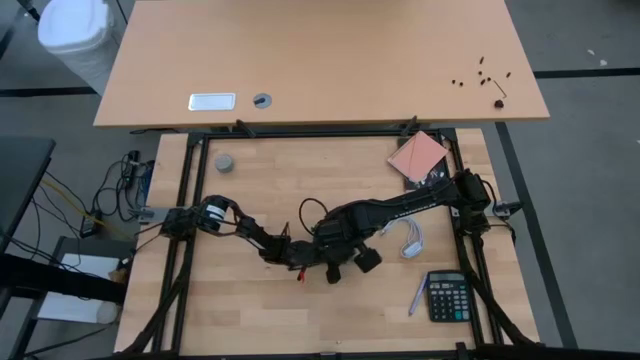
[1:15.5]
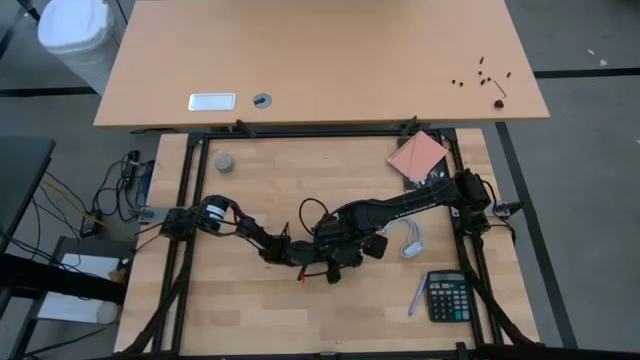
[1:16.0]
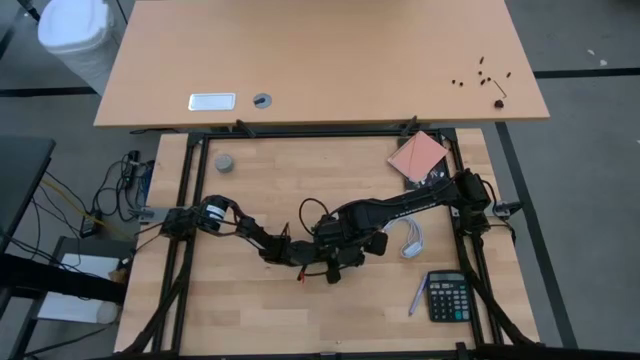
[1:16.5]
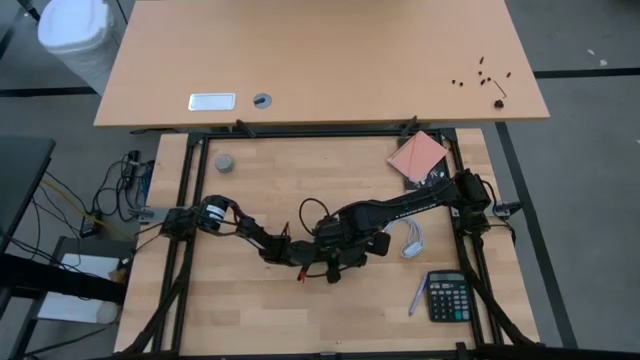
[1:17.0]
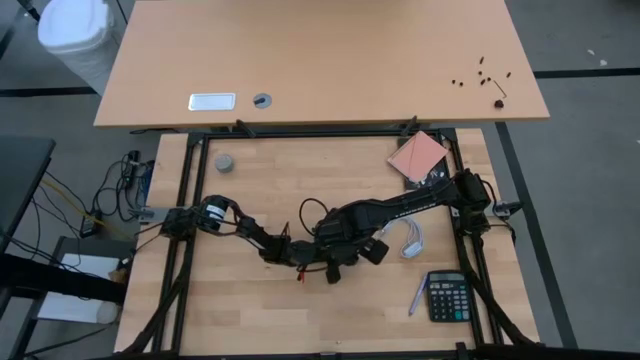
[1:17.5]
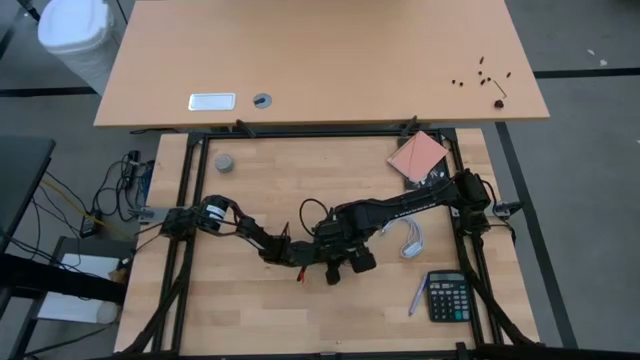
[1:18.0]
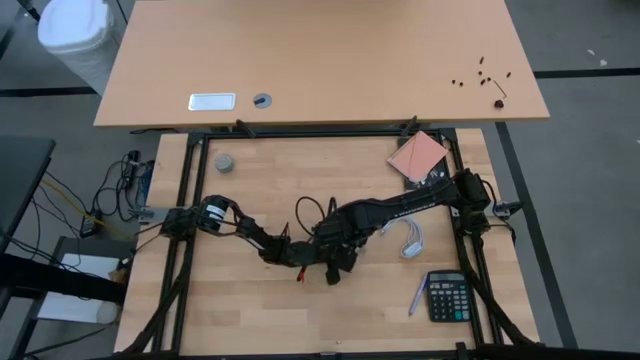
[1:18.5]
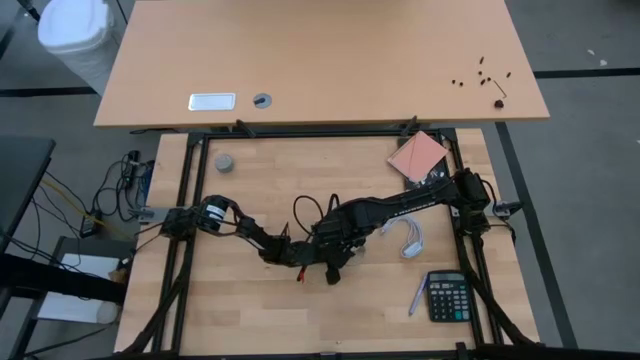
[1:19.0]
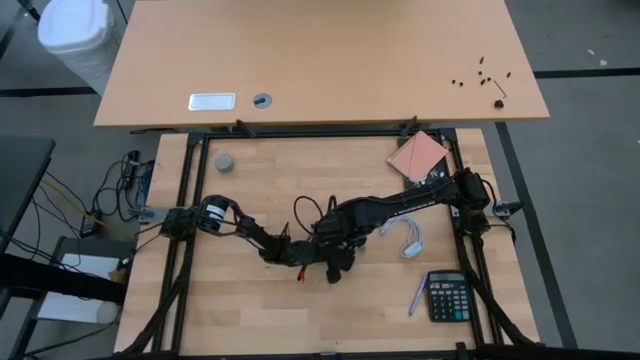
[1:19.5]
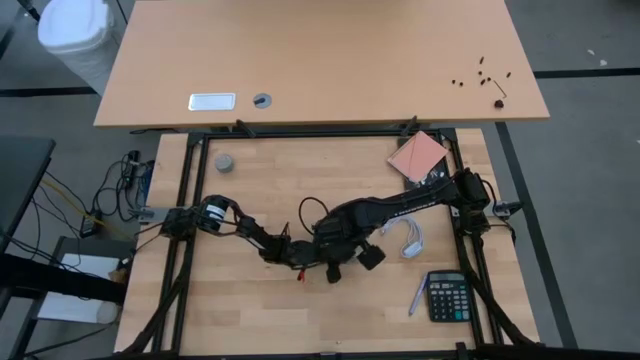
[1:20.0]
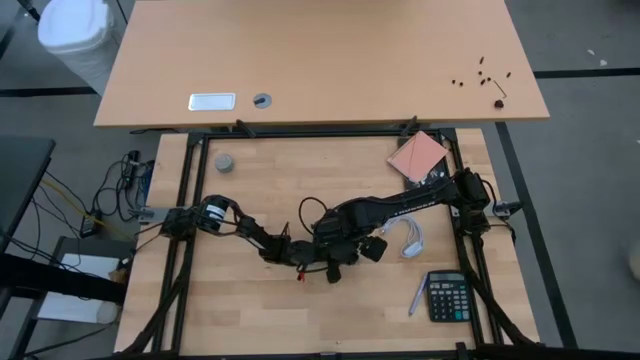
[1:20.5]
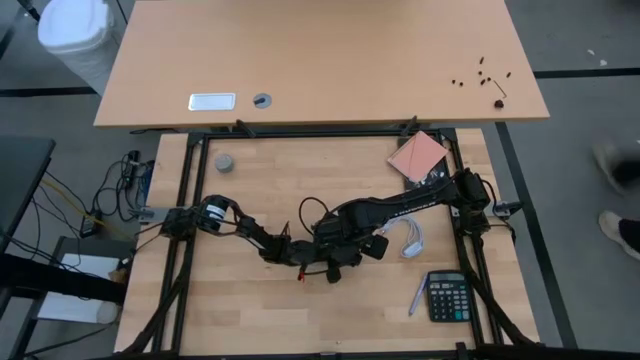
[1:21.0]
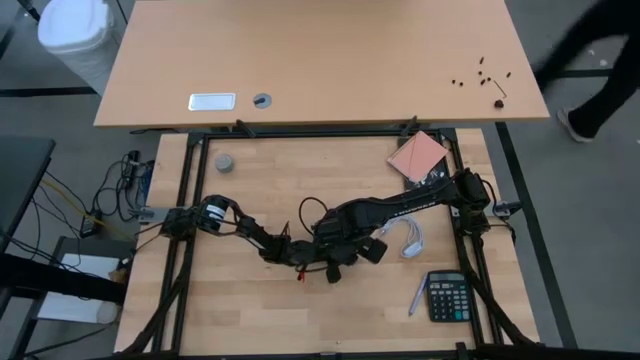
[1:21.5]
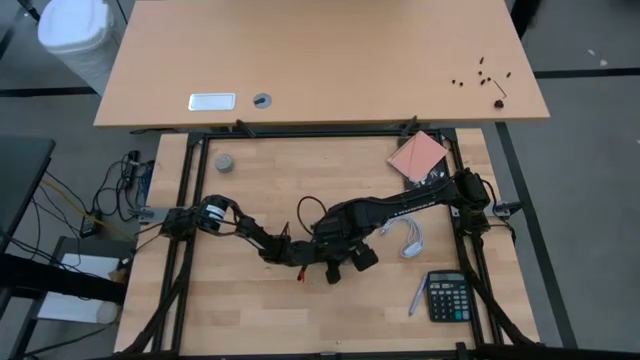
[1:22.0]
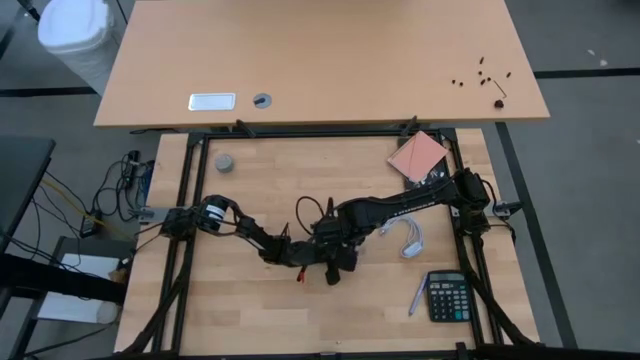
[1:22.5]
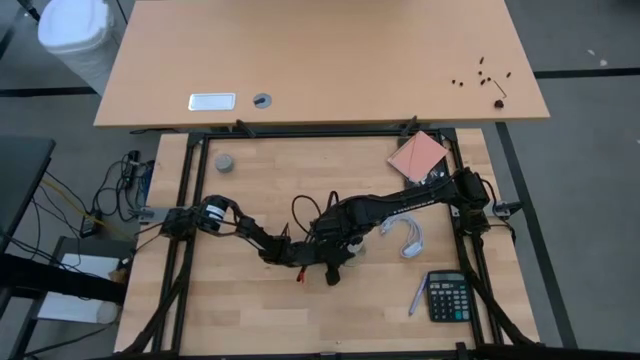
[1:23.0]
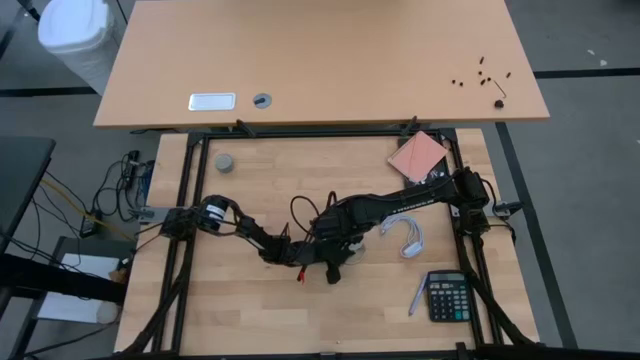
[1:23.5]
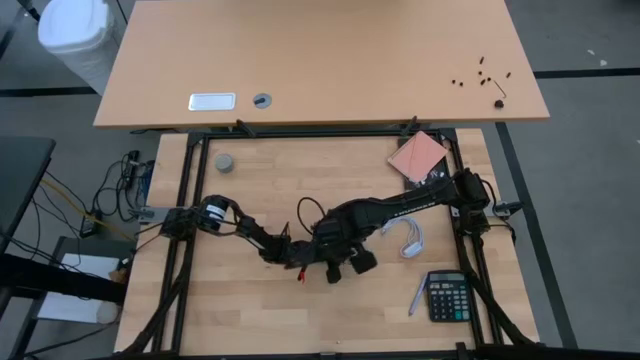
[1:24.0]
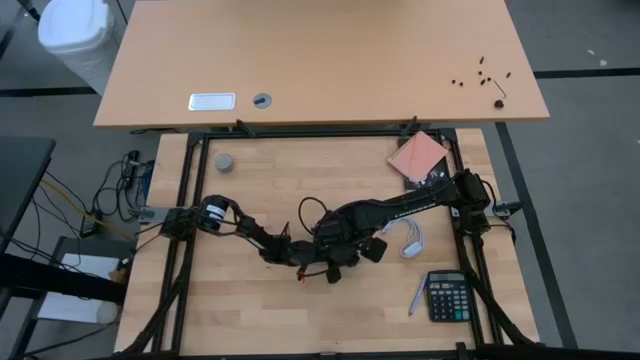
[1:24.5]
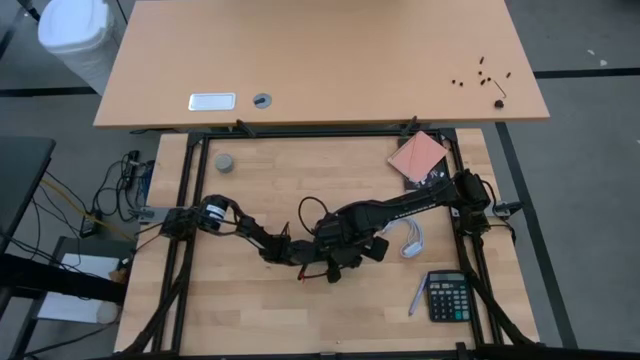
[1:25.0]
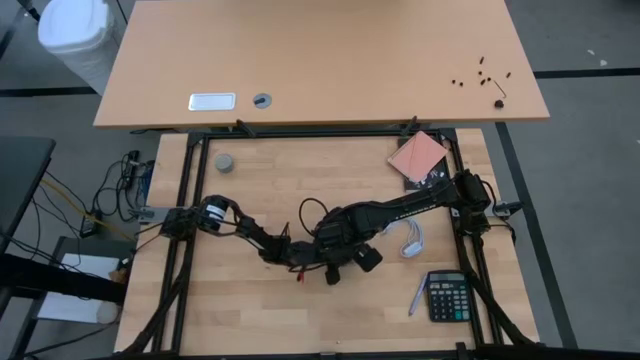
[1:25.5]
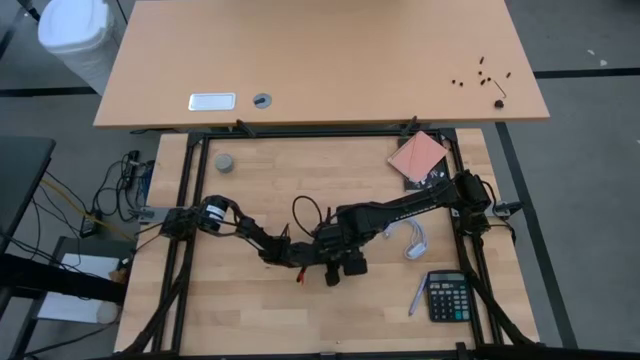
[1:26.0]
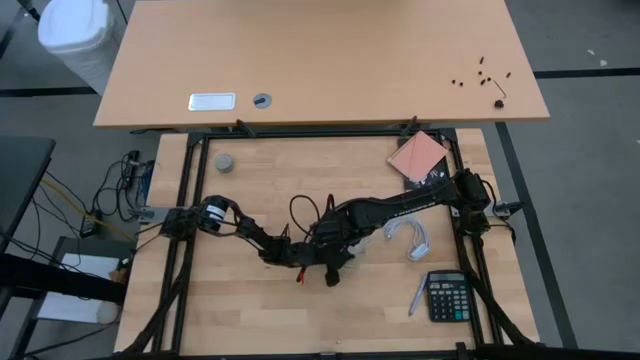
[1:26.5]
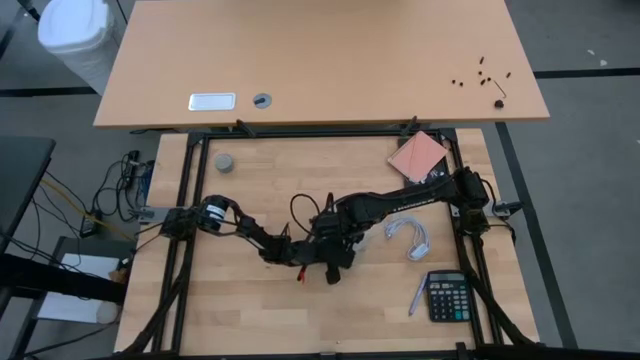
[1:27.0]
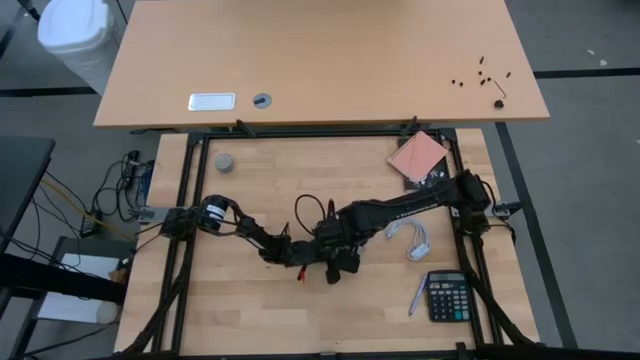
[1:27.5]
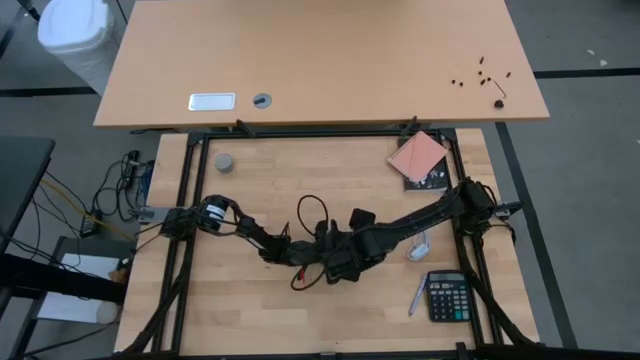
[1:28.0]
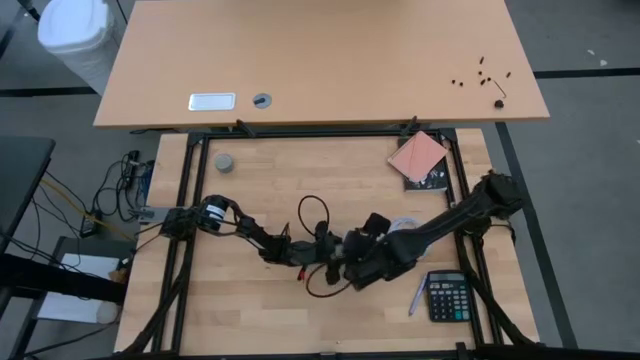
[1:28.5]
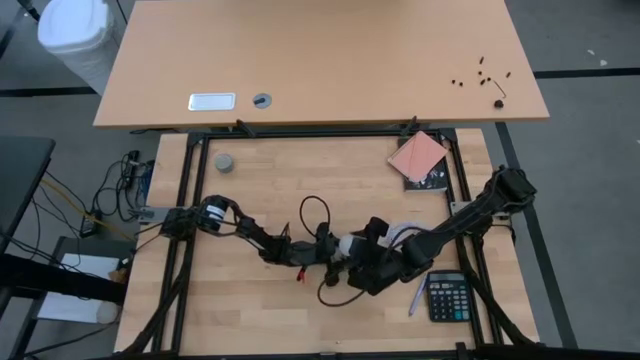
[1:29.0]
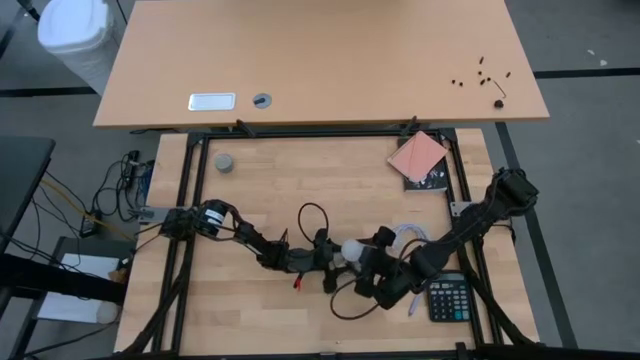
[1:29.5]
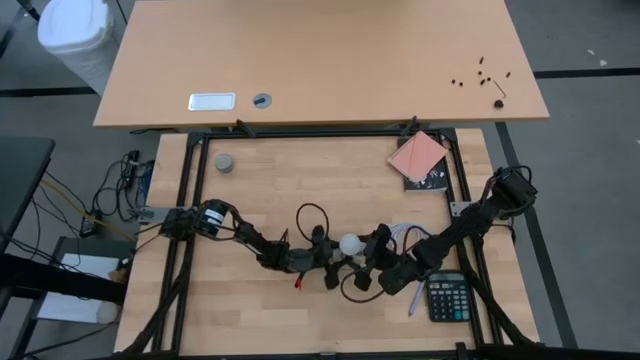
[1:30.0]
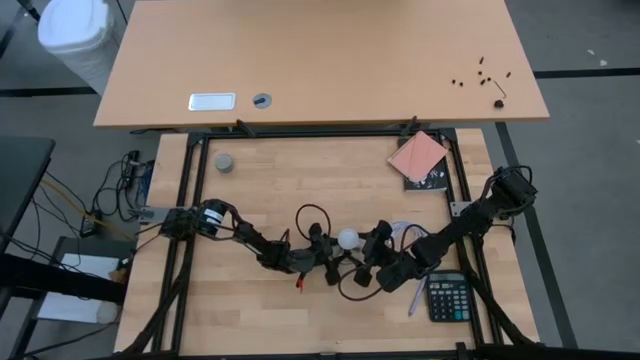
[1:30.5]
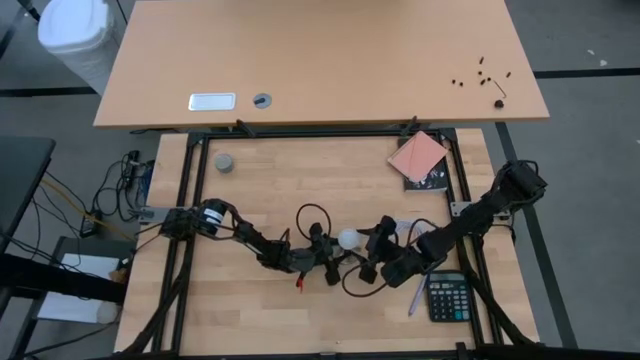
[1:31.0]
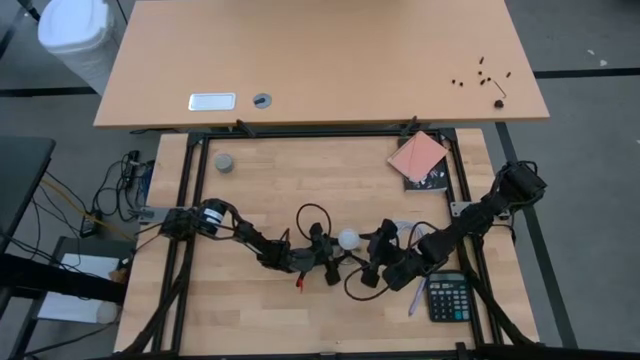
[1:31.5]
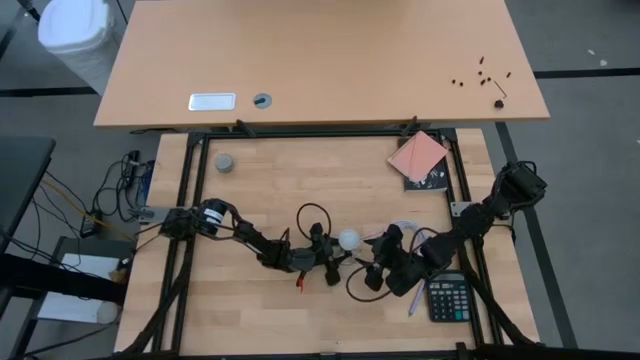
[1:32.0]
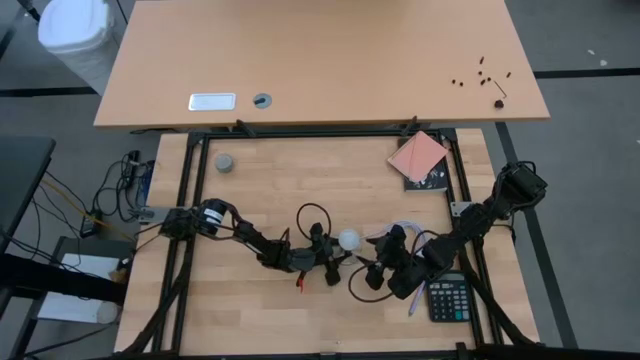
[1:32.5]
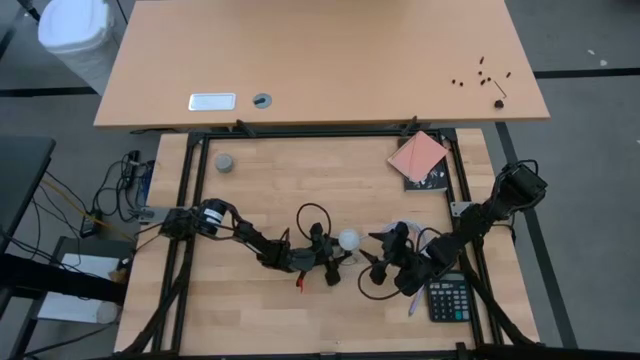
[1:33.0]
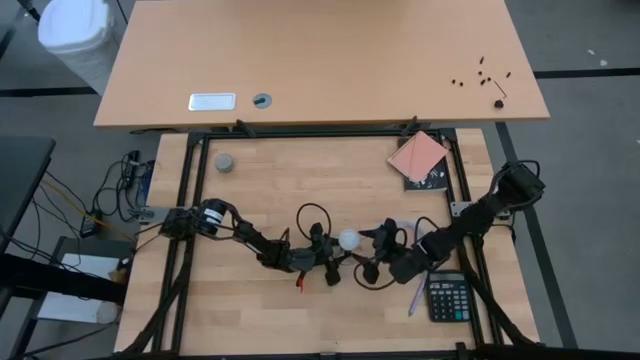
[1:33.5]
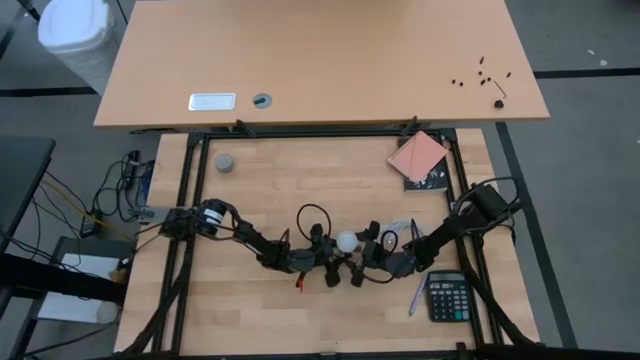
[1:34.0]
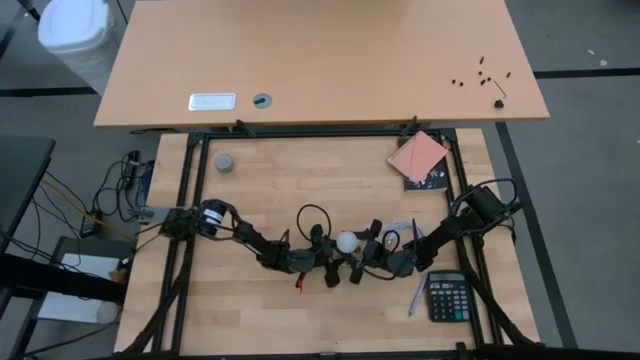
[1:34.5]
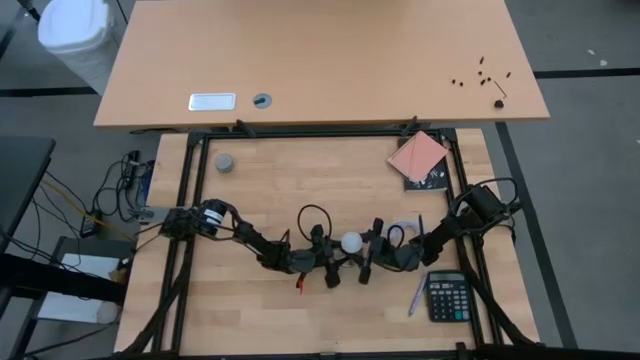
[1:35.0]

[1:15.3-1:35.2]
Task: Screw lightbulb
Insert the white lightbulb into the golden lamp
